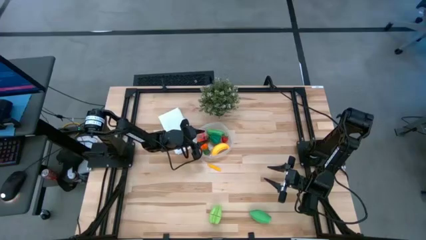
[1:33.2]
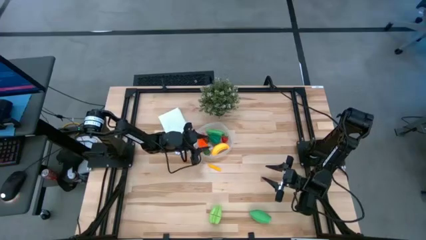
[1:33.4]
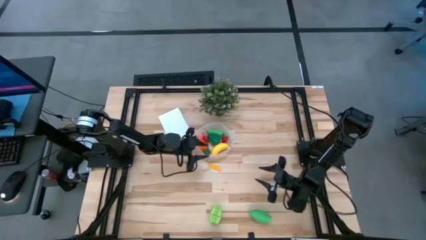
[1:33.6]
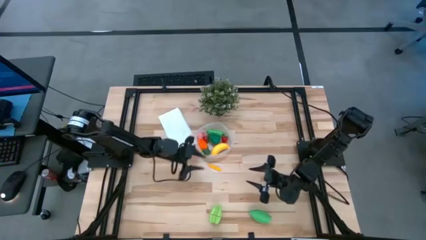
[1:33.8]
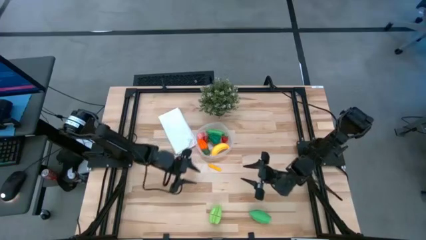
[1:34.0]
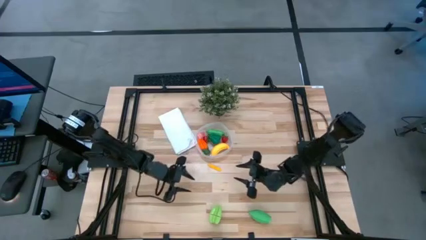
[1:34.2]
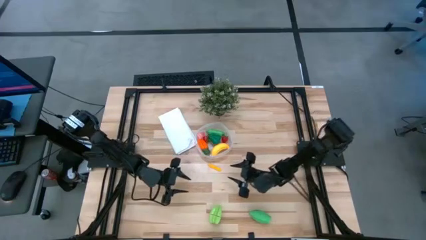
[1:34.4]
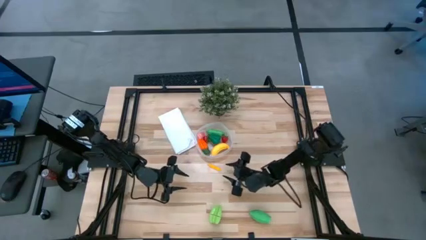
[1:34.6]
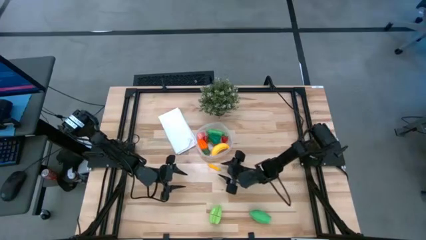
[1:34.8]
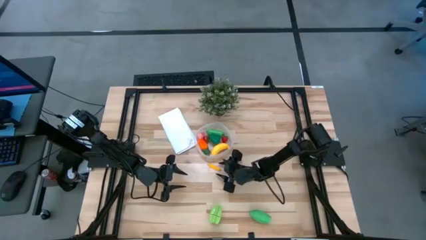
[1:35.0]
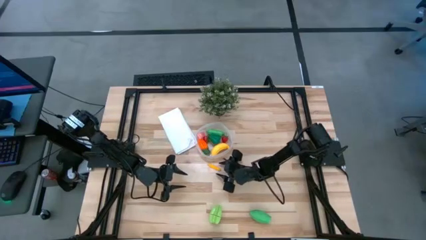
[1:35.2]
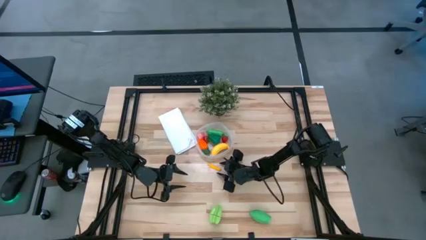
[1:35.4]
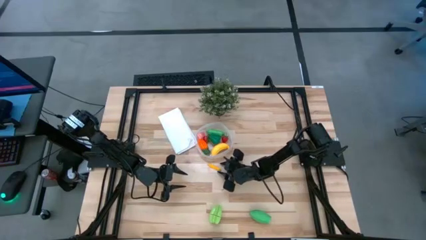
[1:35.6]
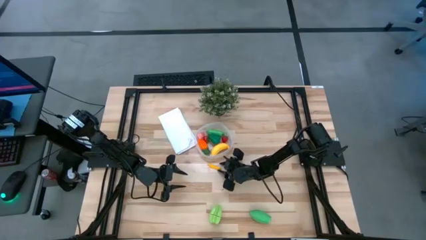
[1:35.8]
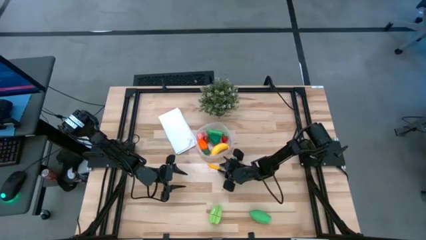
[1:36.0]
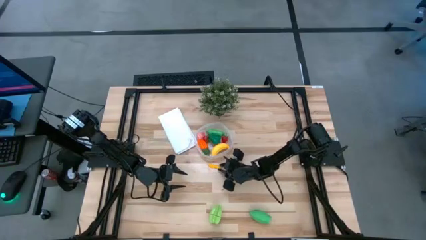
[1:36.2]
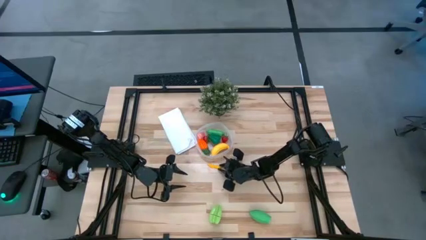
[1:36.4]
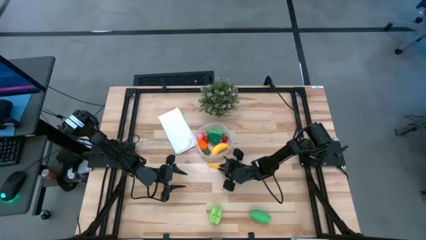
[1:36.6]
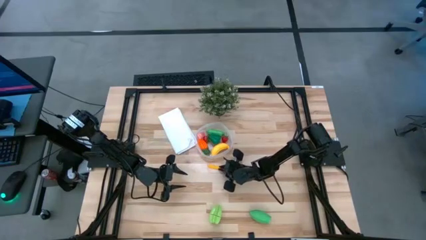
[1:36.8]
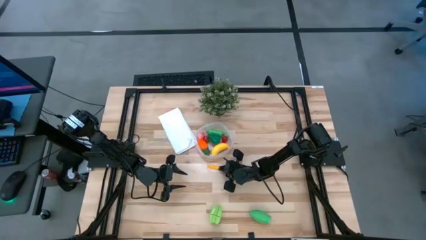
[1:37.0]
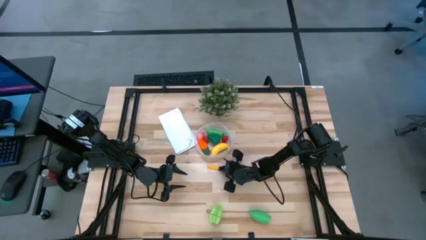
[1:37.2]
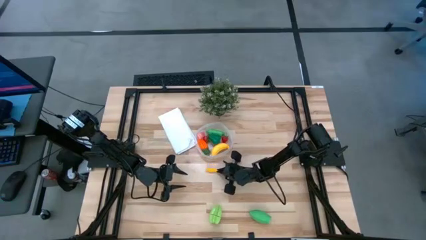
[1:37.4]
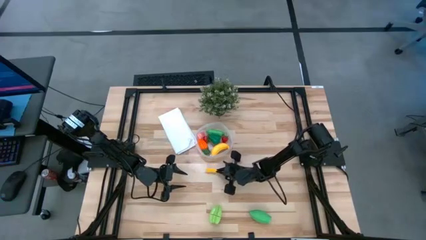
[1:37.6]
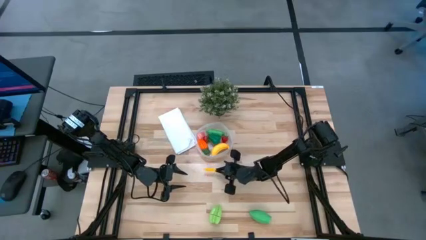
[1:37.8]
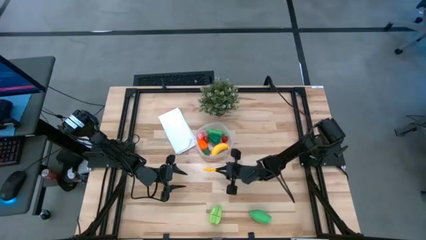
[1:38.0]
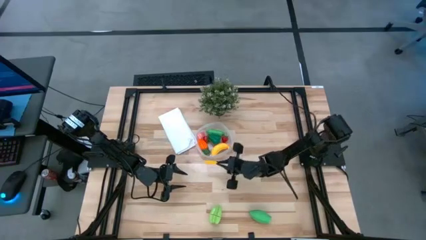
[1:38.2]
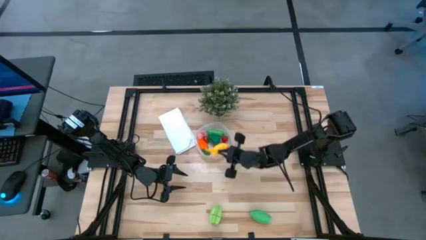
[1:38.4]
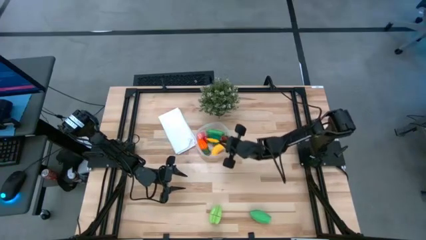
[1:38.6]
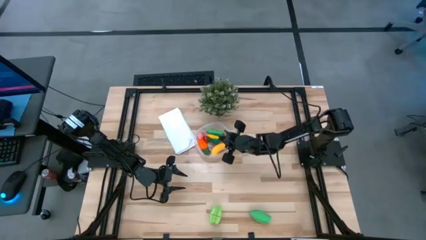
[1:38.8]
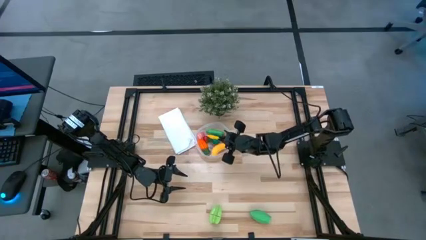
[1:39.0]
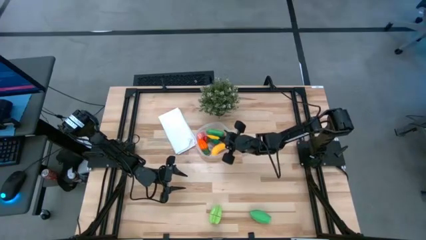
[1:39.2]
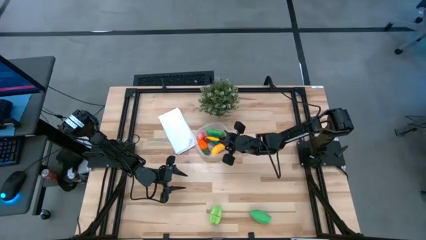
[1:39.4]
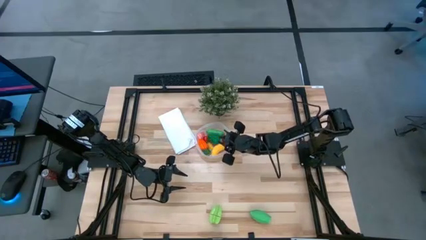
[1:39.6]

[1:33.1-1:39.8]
Task: Pick and placing Produce into tupperware
Put the yellow corn into the transparent bin

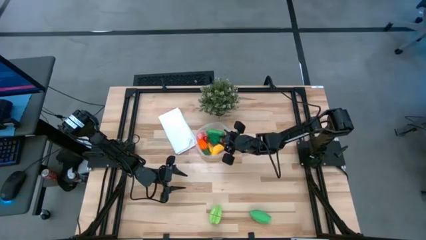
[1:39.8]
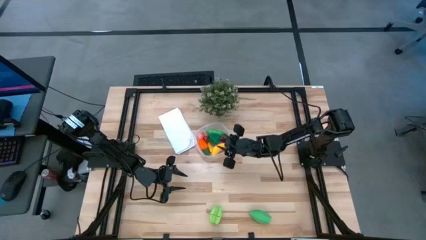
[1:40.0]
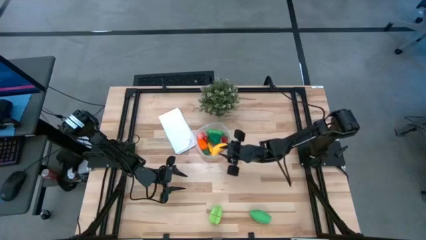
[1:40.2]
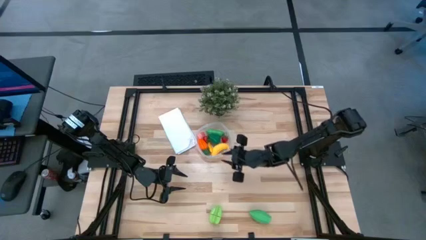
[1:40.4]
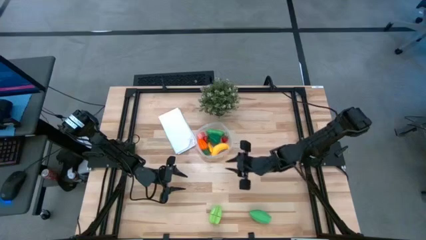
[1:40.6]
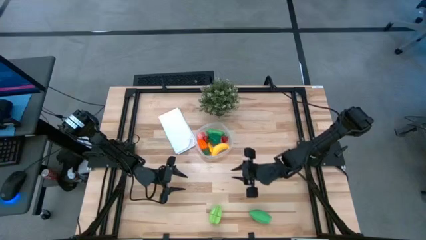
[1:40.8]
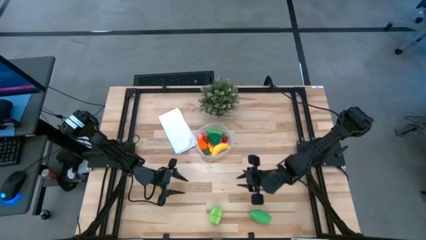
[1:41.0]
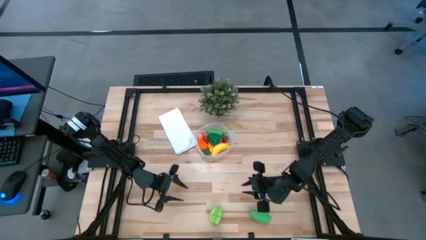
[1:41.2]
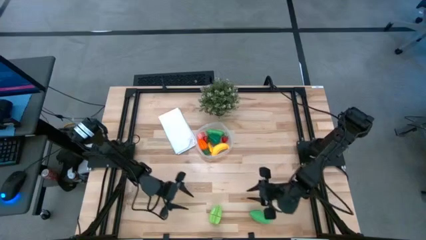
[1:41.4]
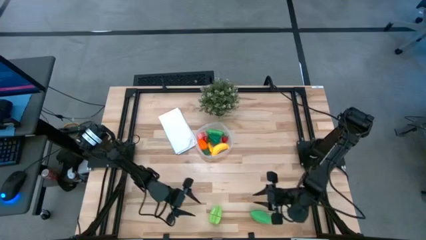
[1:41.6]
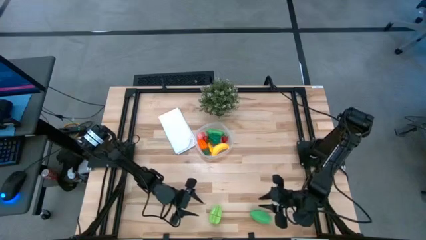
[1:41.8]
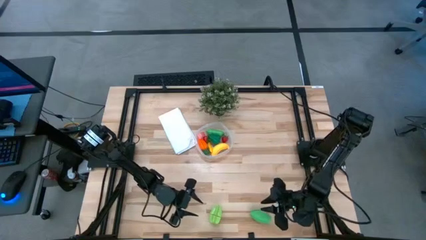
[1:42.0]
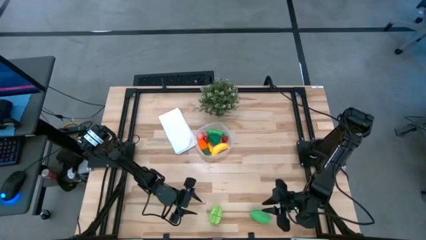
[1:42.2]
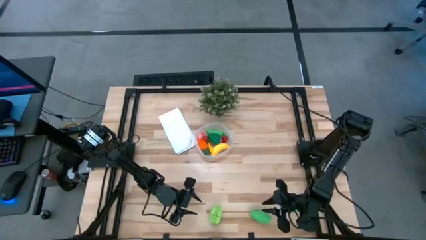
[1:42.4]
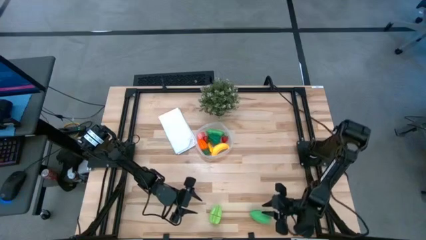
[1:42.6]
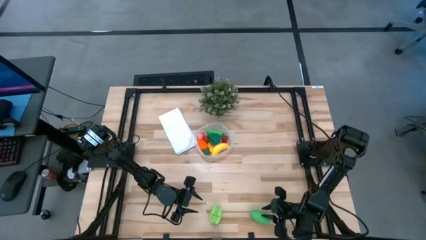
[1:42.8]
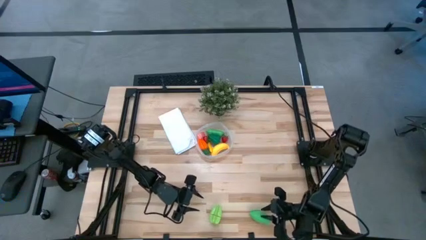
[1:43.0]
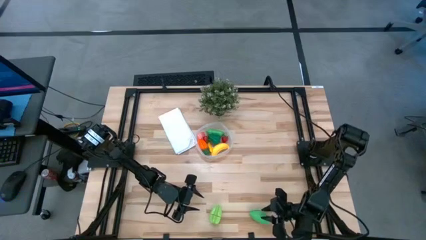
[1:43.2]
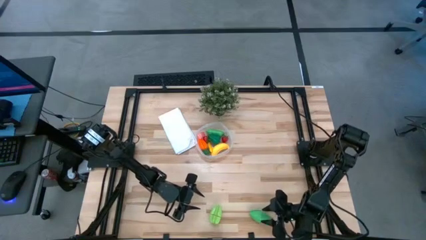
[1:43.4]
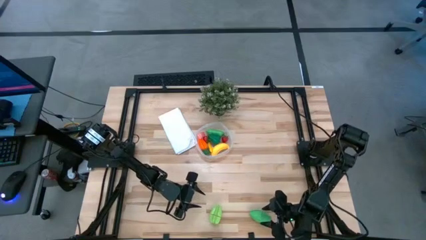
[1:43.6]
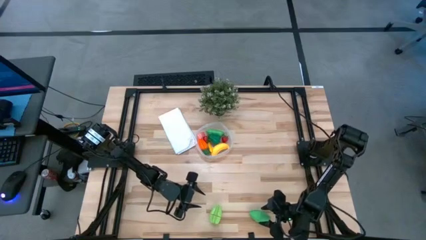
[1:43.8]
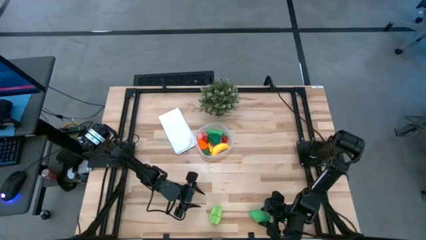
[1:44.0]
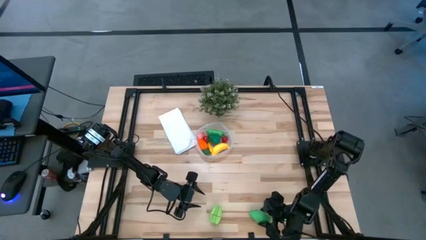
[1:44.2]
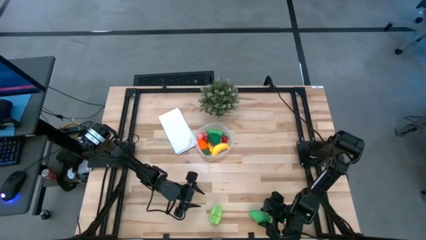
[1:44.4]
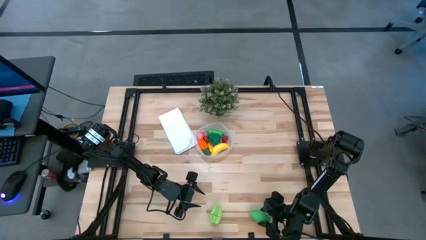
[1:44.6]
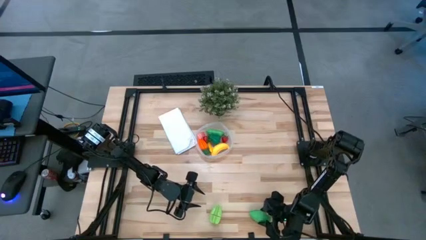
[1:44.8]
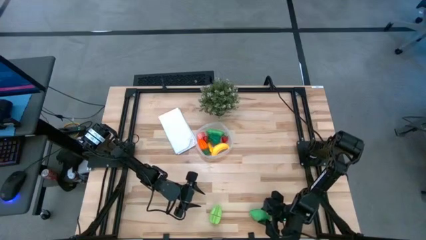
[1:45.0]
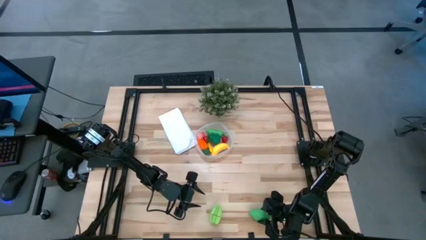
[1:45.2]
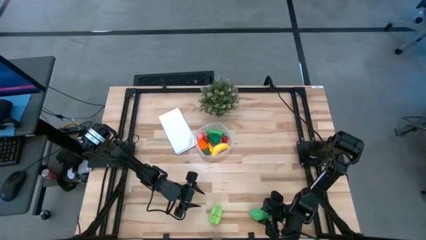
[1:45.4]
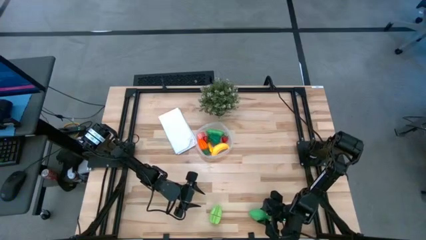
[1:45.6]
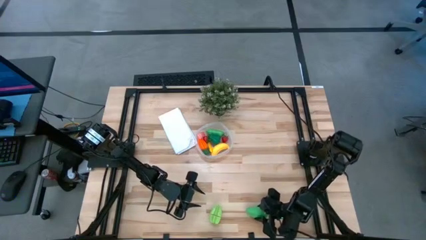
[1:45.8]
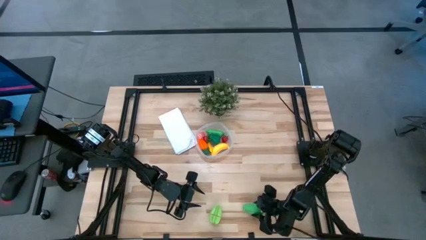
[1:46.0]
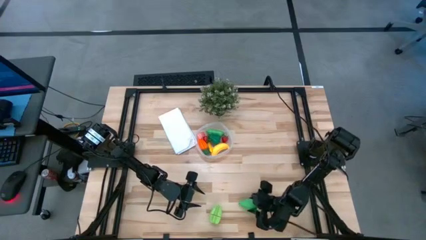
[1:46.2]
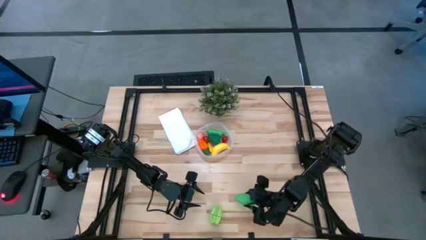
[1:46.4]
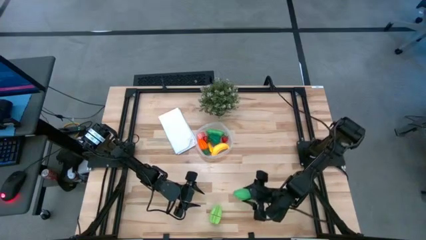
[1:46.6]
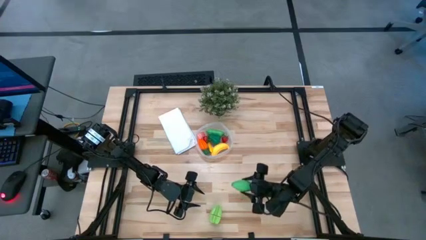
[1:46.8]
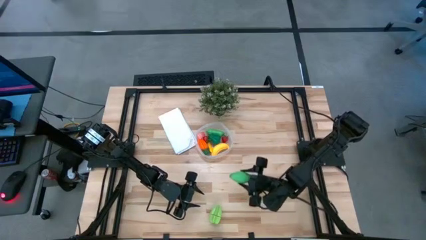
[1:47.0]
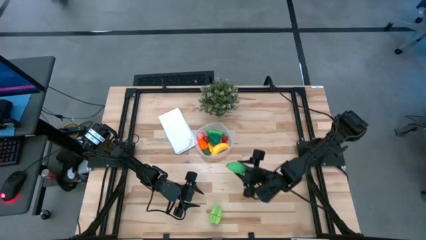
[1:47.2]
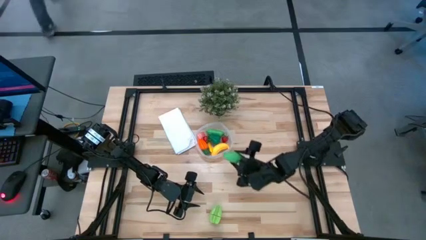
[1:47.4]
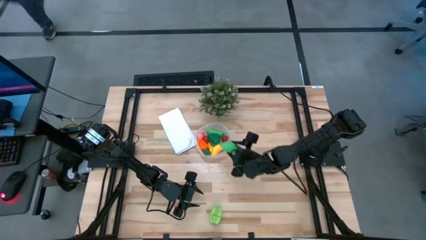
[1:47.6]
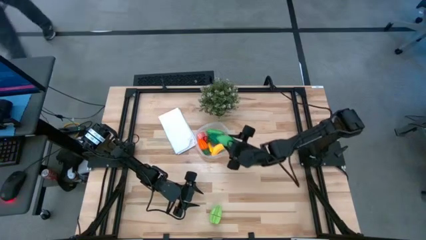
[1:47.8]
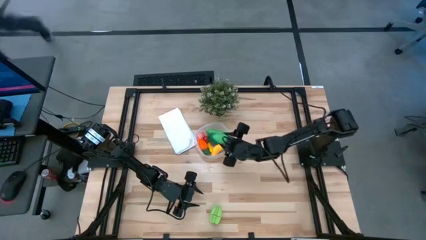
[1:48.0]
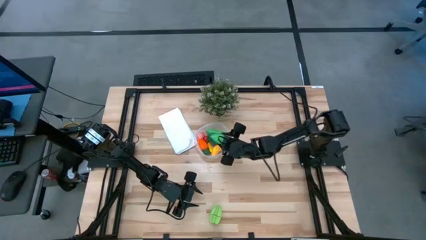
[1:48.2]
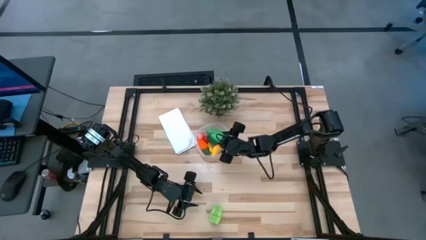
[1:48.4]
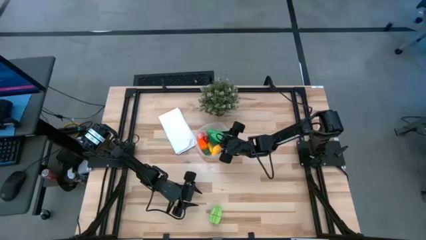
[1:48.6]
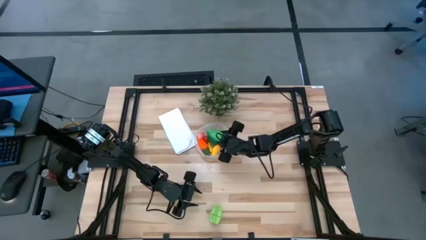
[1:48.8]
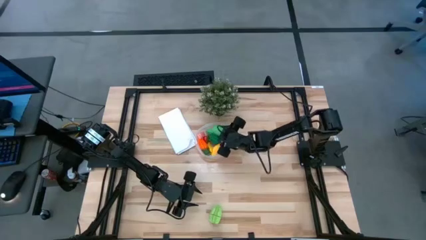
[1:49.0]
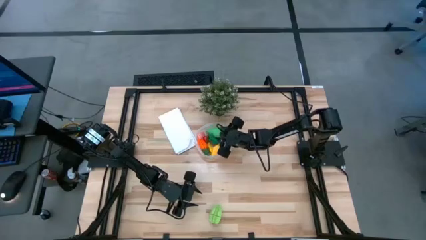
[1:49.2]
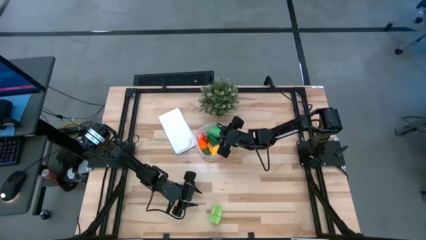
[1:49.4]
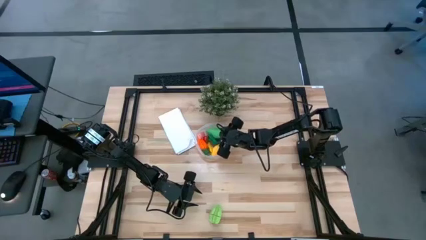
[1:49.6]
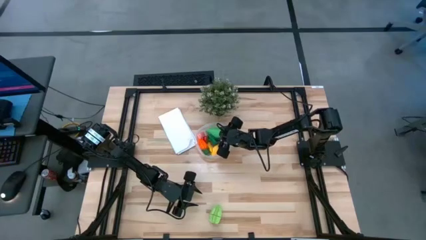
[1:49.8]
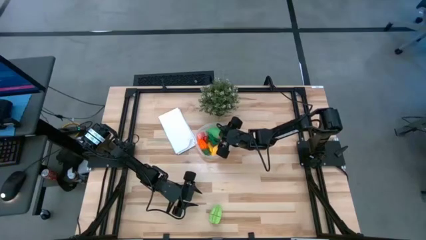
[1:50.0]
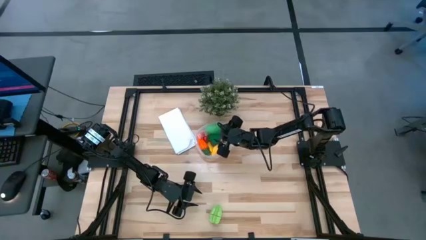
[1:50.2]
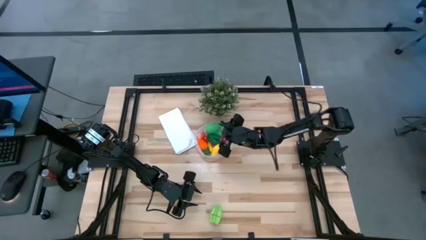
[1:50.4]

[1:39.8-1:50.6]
Put the green corn into the transparent bin

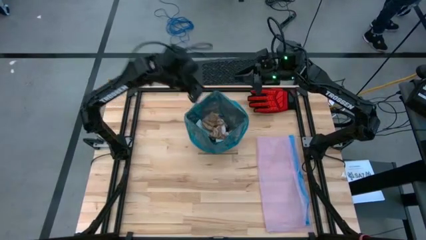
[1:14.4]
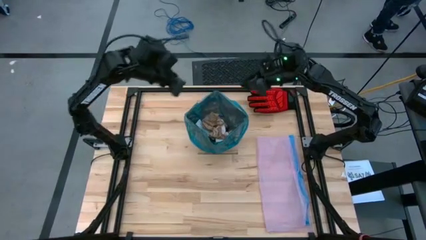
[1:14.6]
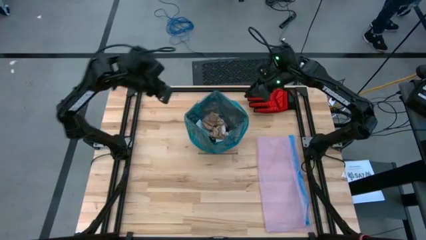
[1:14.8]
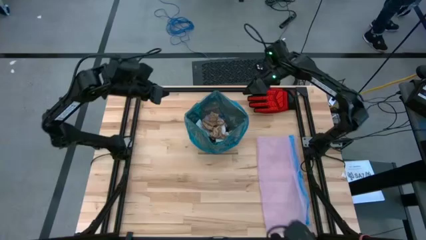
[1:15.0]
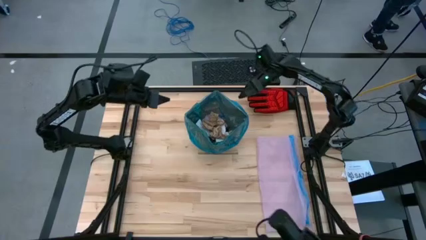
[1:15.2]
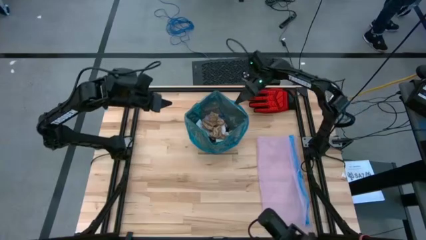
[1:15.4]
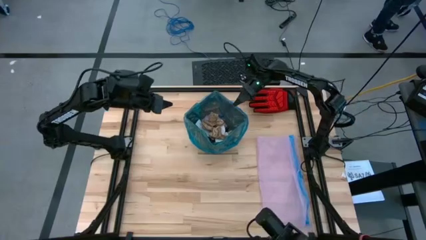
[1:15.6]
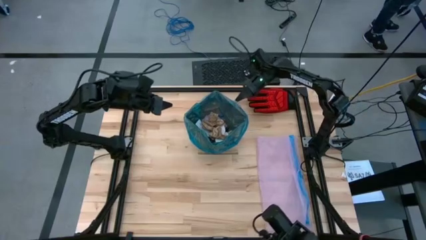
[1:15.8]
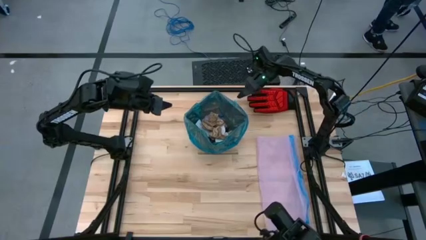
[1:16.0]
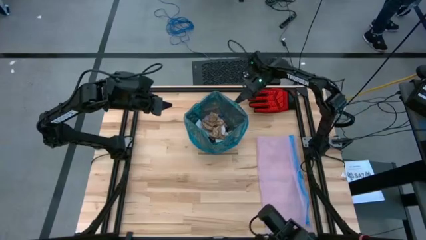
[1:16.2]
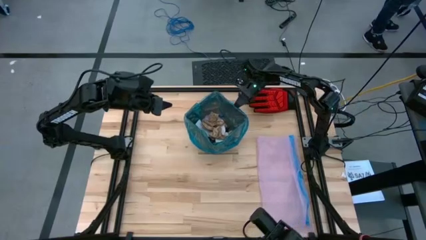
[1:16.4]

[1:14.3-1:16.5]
Task: place trash/remove bag and relplace
Remove the blue trash bag from the trash bin
